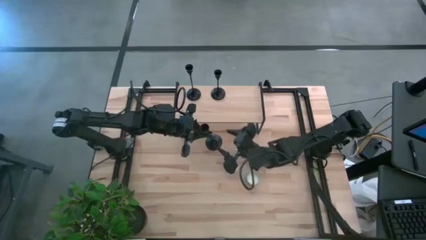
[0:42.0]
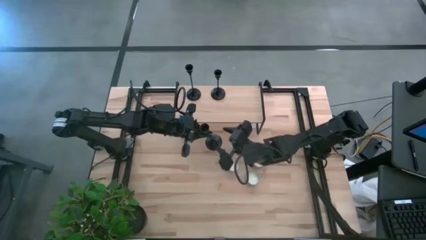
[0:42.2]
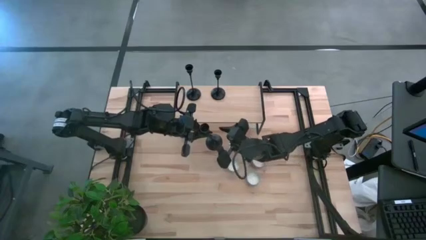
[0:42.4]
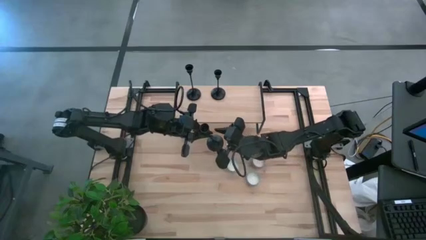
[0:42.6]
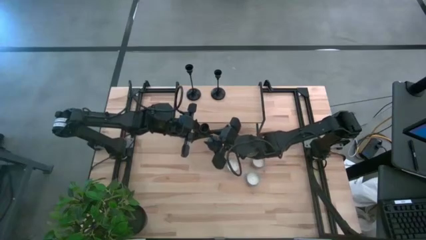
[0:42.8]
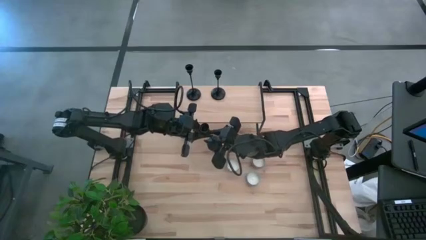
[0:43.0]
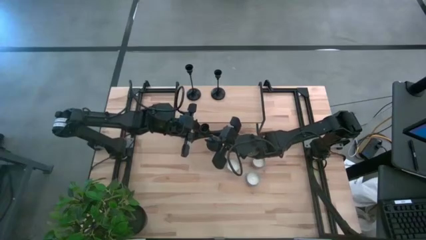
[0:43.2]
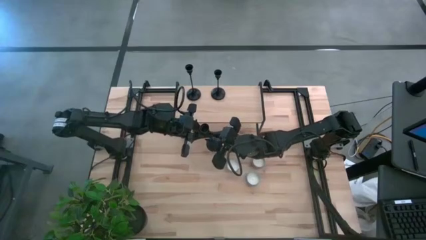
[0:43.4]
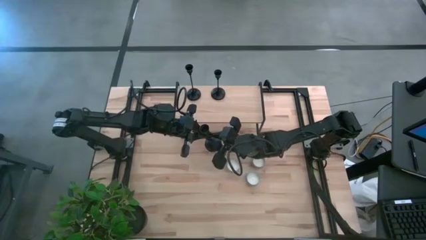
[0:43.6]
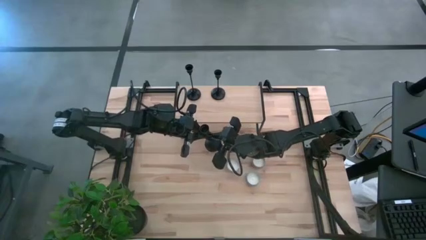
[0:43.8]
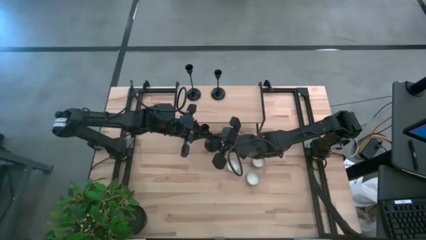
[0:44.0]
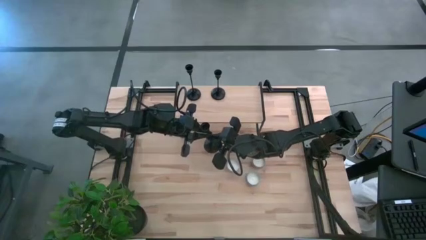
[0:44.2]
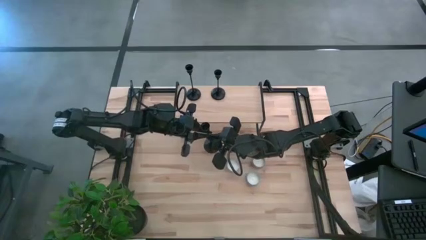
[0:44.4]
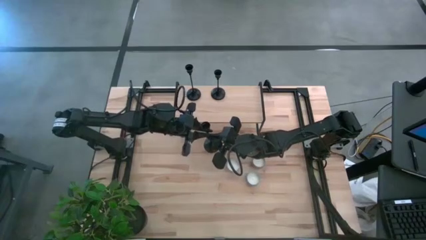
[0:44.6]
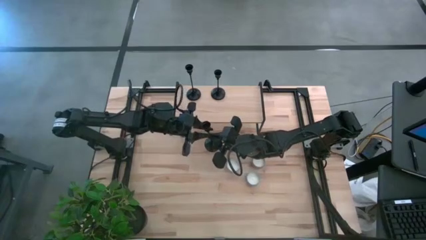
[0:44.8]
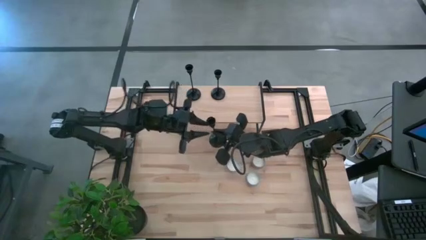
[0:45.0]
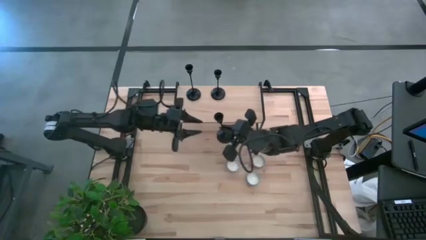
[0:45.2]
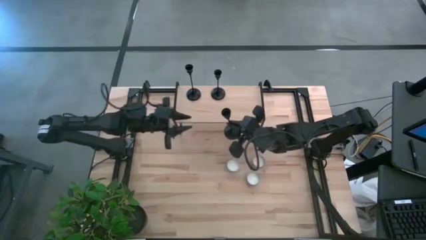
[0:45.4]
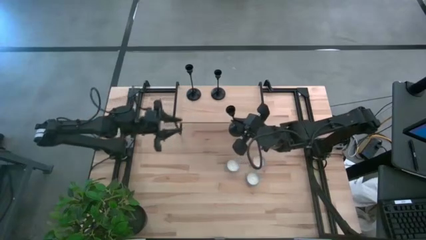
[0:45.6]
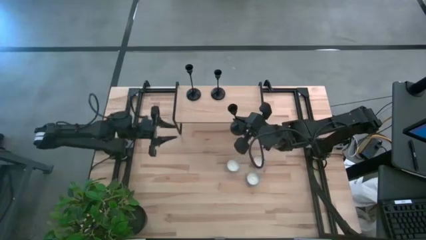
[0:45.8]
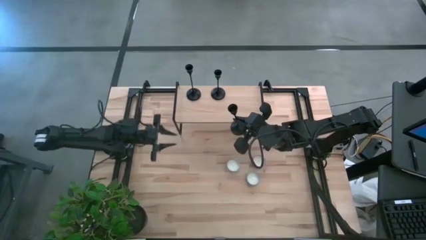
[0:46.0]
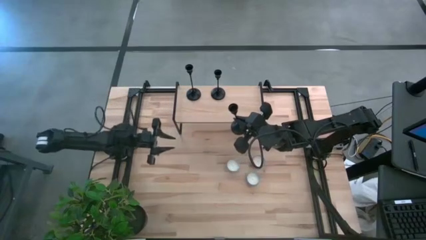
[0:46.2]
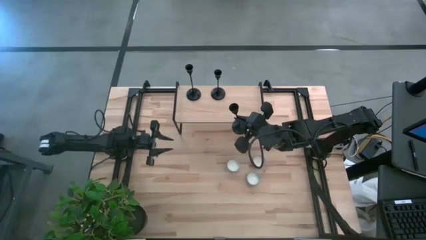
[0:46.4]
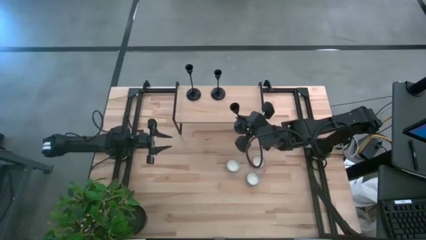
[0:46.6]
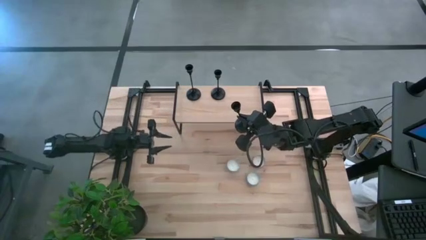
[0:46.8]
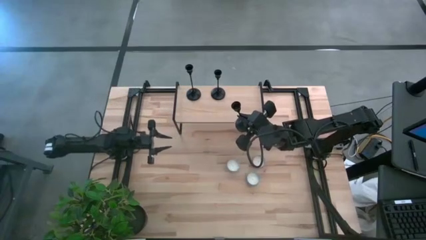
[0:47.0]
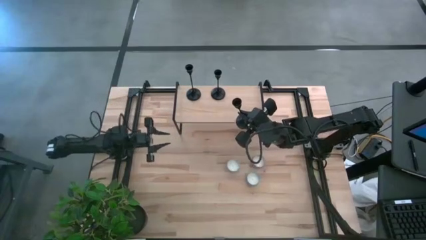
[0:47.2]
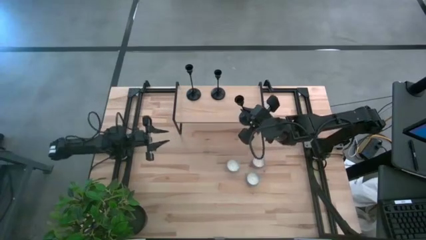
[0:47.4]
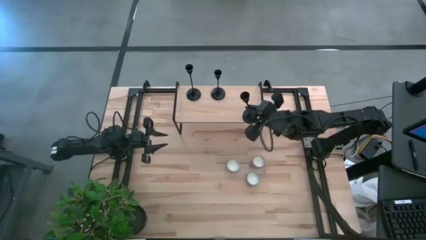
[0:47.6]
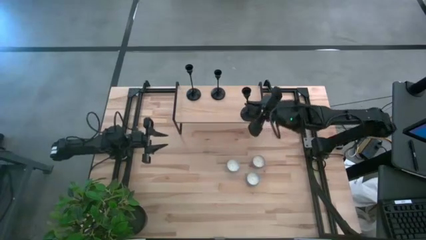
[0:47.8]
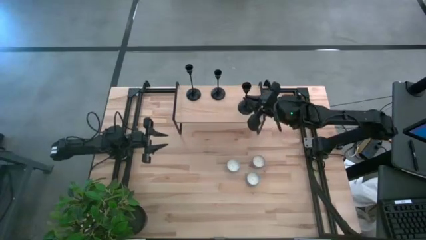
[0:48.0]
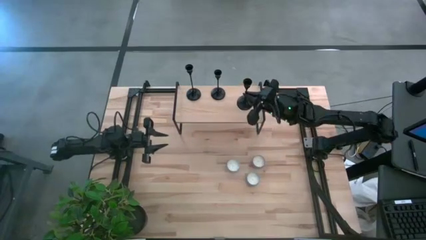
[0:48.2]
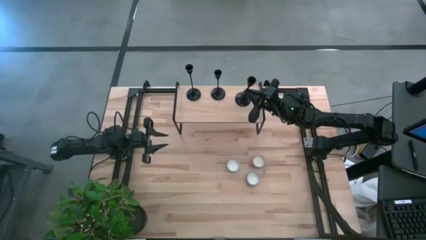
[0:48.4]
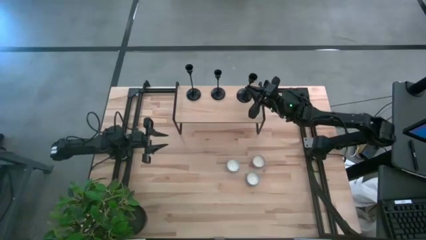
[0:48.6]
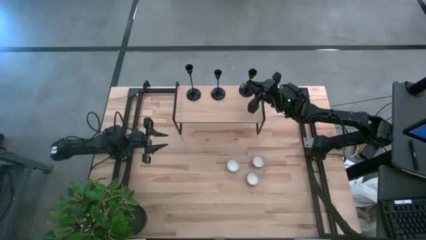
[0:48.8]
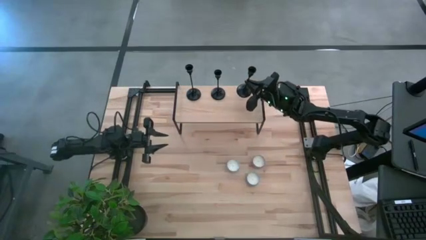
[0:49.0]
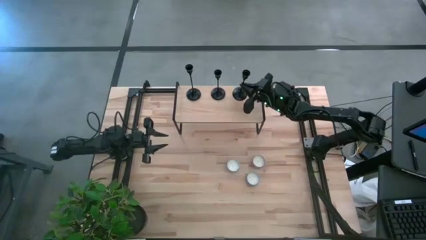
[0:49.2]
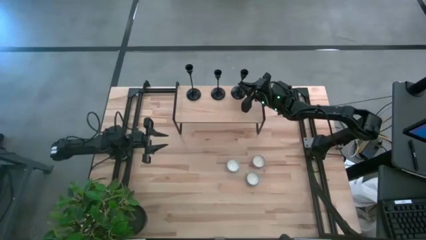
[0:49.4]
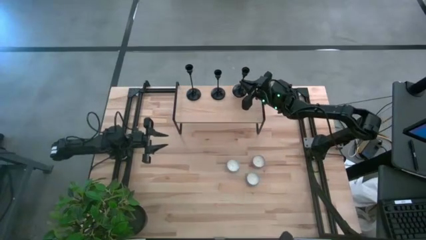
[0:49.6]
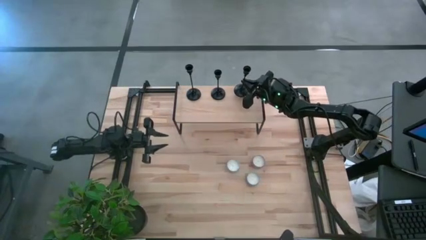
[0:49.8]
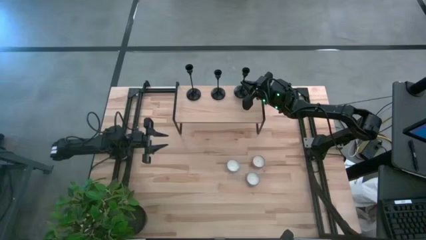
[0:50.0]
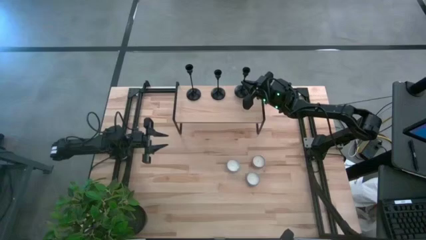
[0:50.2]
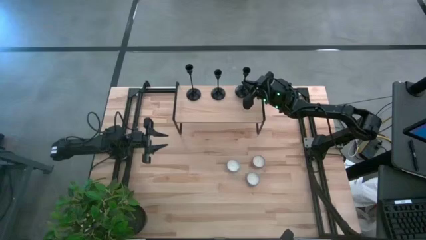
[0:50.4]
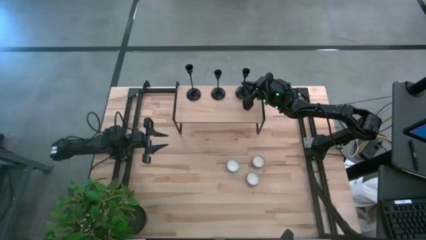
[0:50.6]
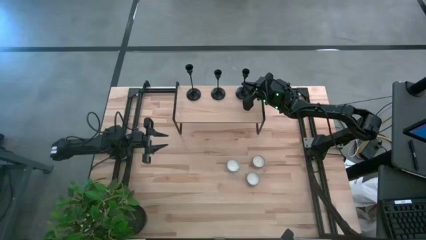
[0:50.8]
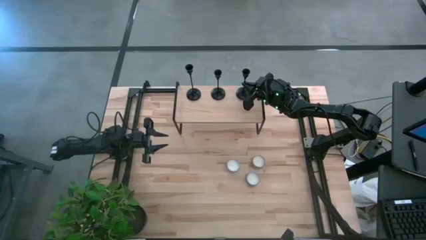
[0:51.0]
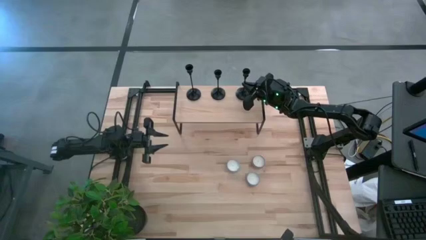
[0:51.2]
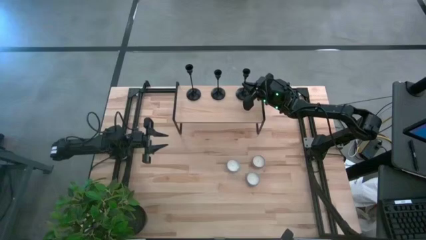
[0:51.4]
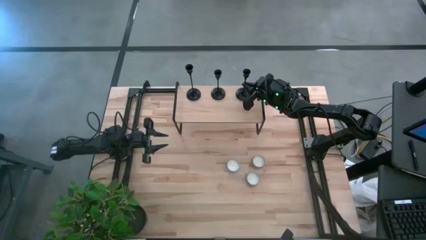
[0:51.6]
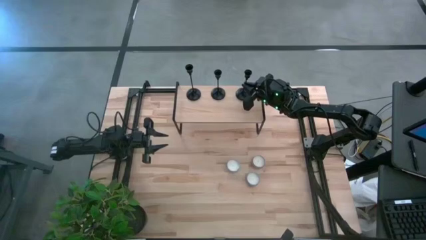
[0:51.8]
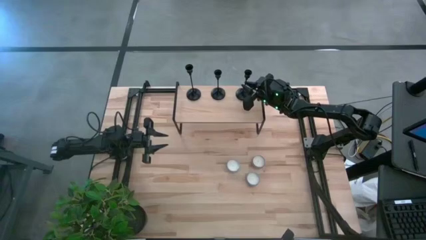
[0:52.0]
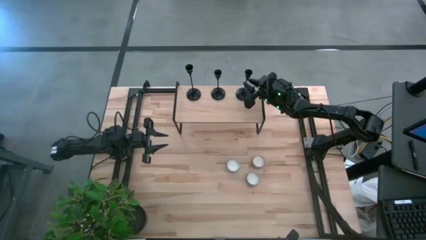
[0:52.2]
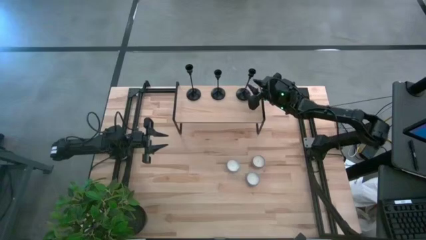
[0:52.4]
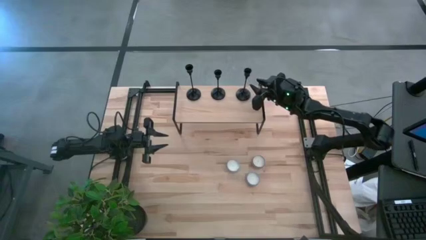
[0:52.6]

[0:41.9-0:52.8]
Task: Pick & Place candle stick holders
Align the black candle holder with the other candle holder on the shelf
